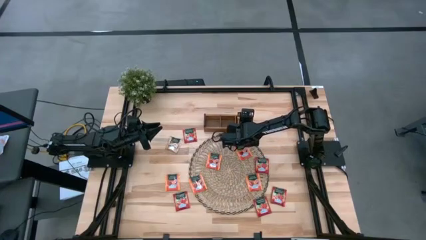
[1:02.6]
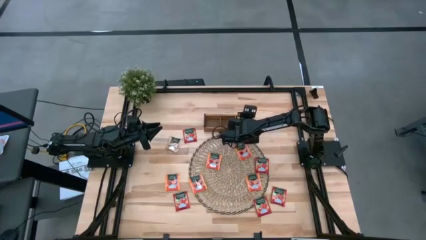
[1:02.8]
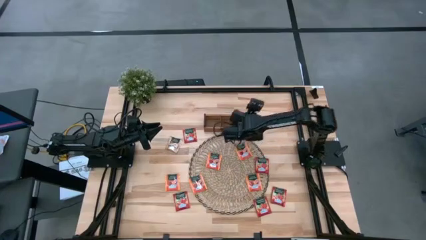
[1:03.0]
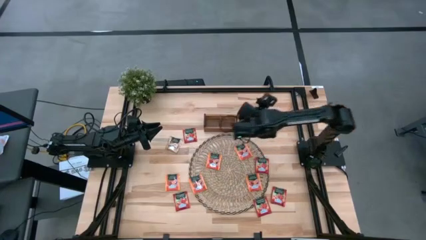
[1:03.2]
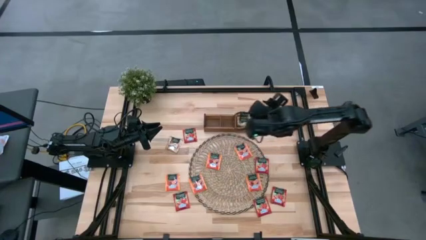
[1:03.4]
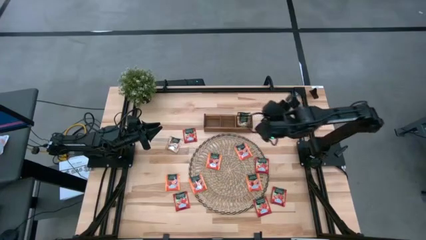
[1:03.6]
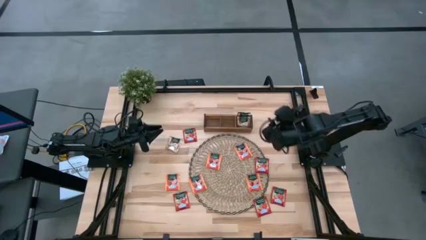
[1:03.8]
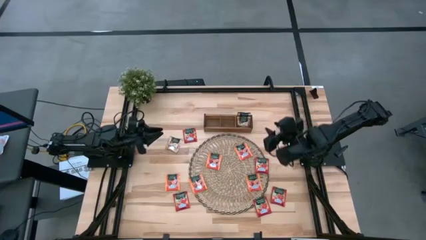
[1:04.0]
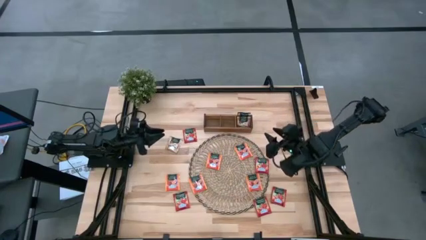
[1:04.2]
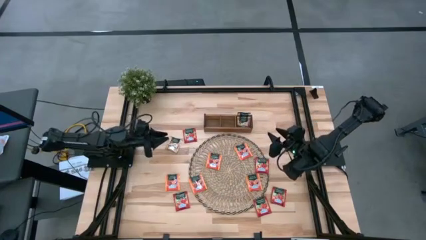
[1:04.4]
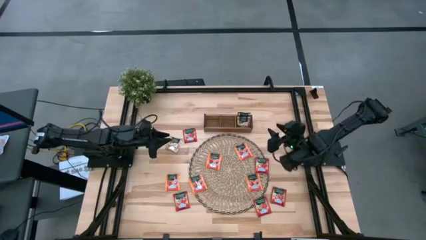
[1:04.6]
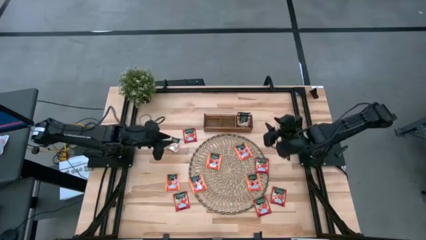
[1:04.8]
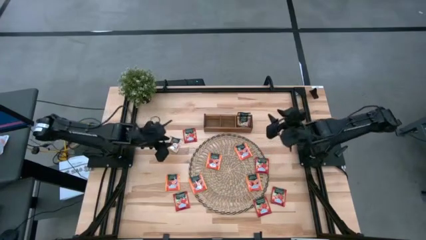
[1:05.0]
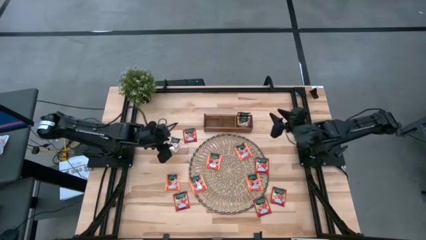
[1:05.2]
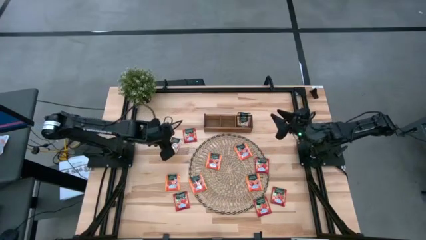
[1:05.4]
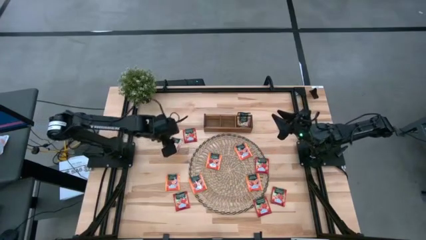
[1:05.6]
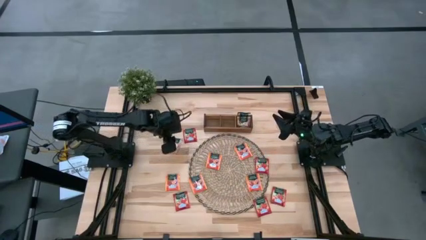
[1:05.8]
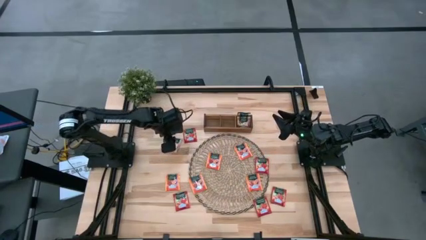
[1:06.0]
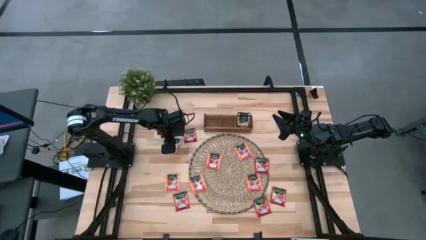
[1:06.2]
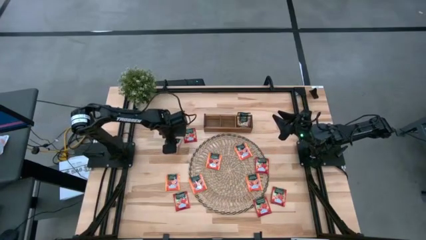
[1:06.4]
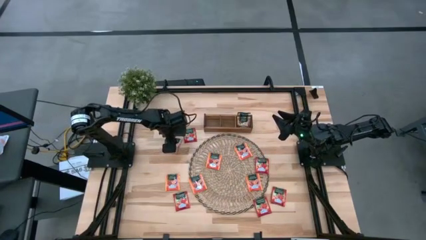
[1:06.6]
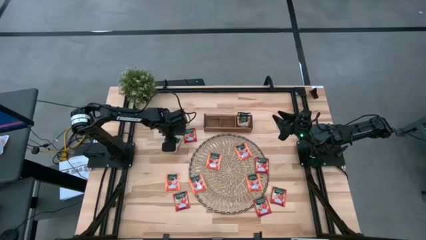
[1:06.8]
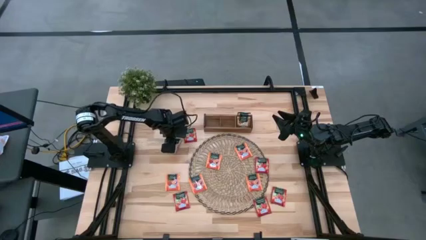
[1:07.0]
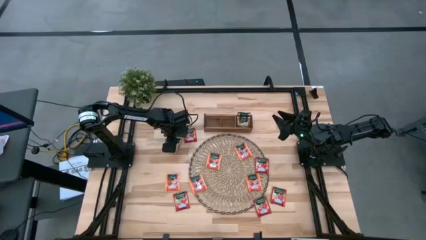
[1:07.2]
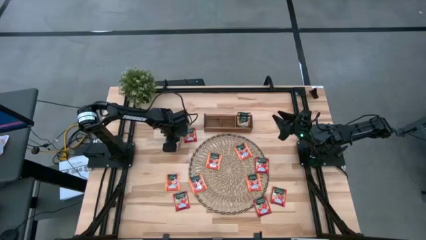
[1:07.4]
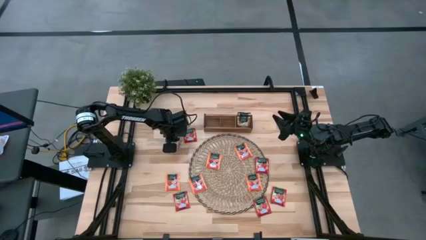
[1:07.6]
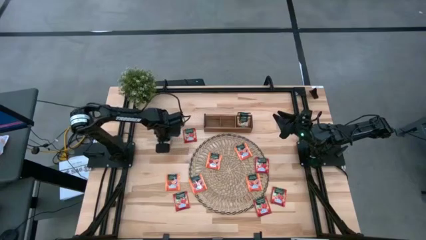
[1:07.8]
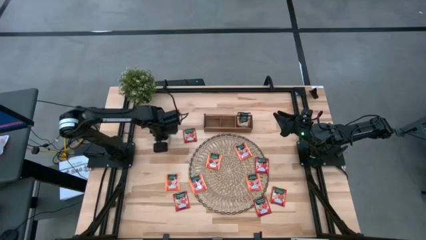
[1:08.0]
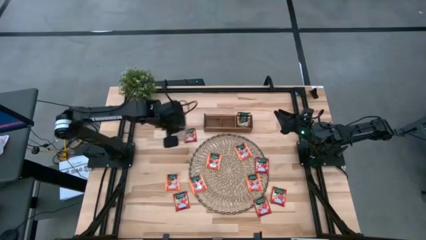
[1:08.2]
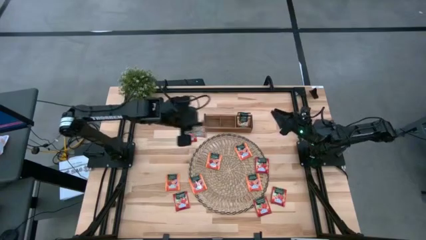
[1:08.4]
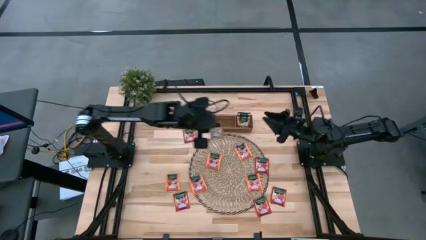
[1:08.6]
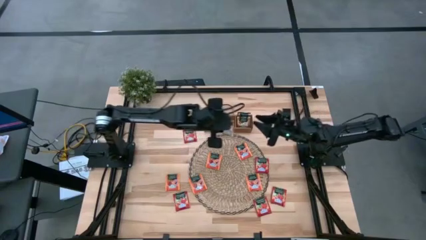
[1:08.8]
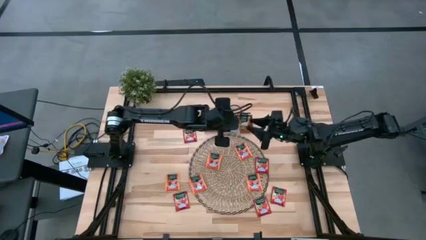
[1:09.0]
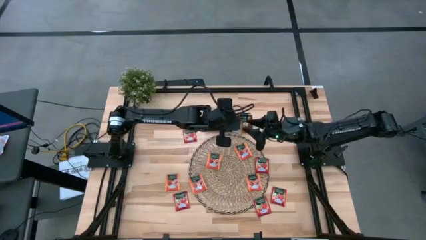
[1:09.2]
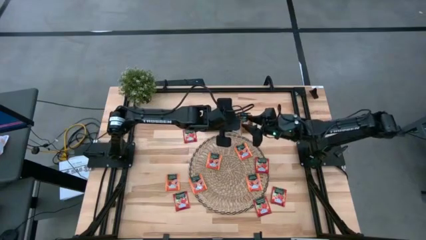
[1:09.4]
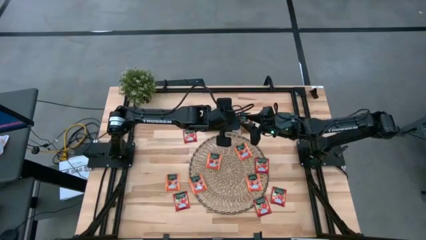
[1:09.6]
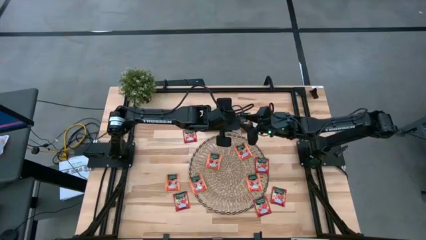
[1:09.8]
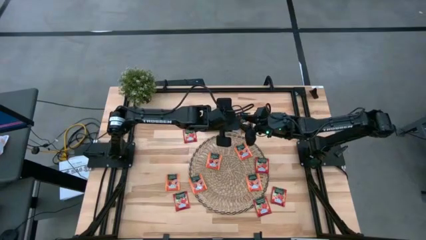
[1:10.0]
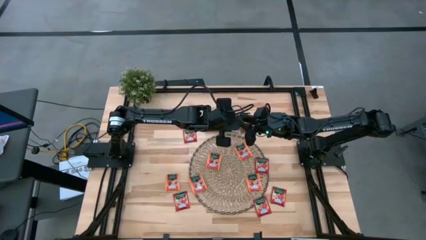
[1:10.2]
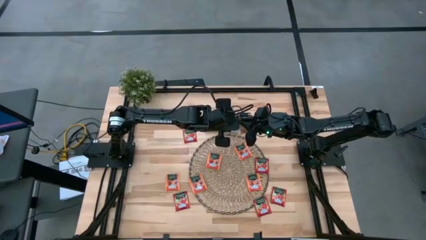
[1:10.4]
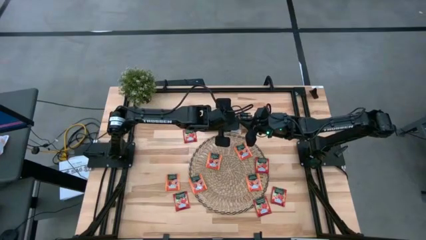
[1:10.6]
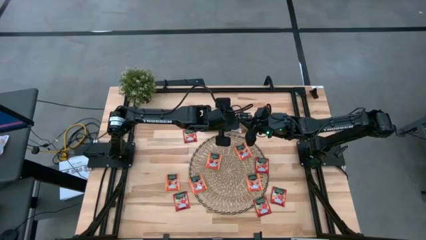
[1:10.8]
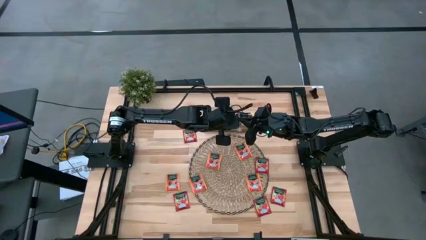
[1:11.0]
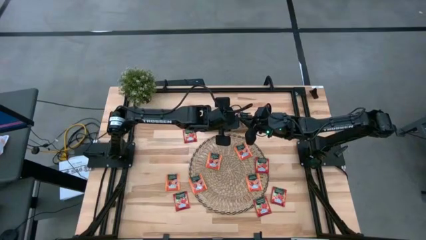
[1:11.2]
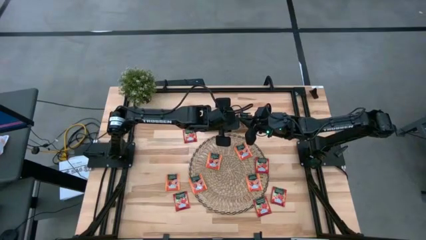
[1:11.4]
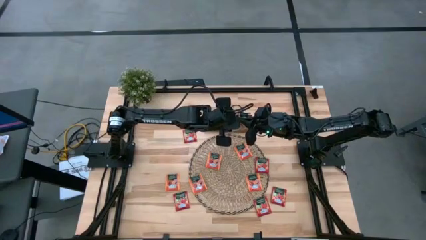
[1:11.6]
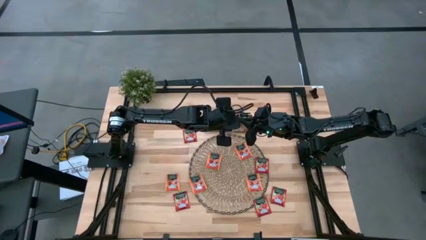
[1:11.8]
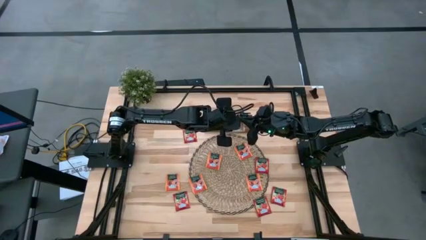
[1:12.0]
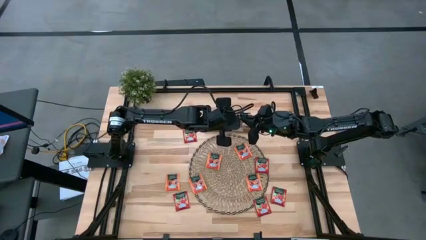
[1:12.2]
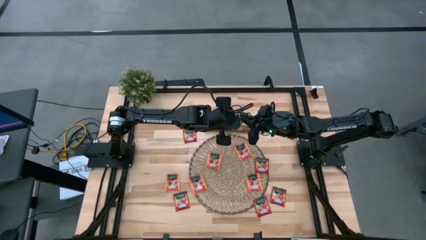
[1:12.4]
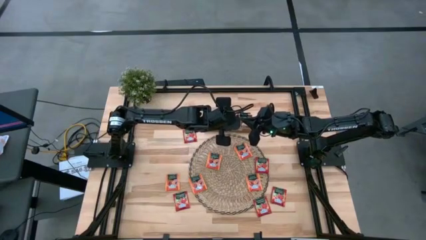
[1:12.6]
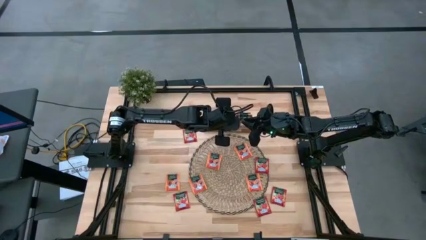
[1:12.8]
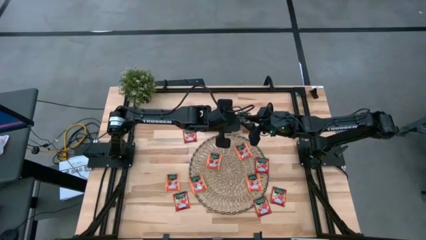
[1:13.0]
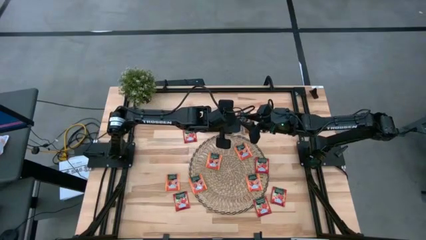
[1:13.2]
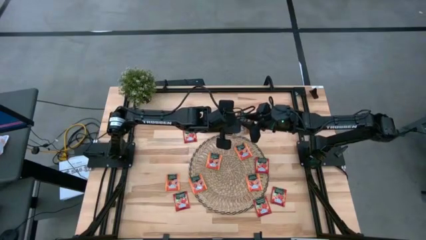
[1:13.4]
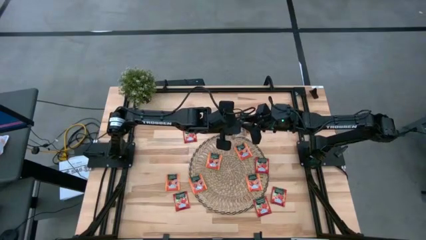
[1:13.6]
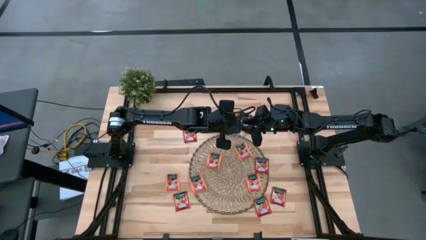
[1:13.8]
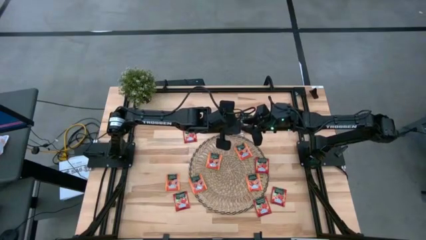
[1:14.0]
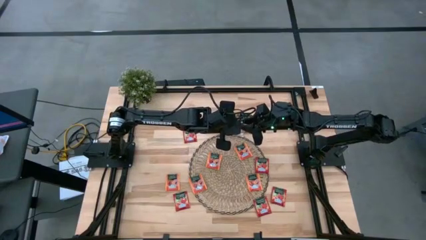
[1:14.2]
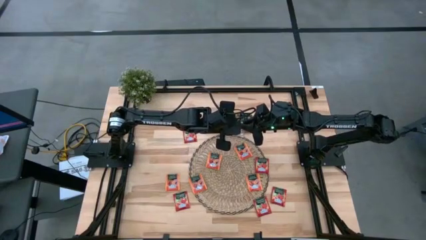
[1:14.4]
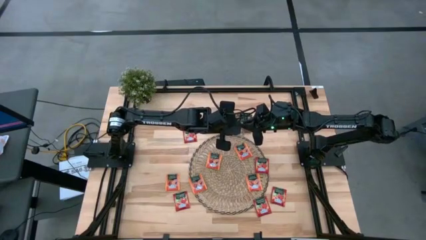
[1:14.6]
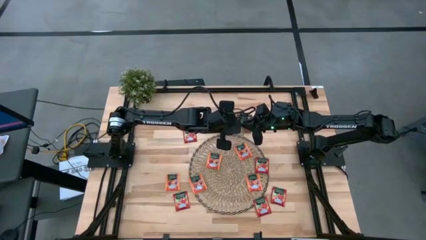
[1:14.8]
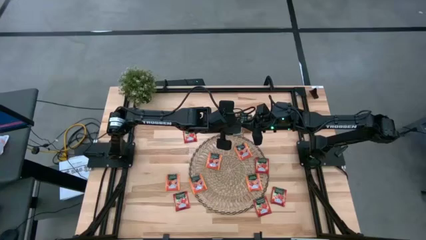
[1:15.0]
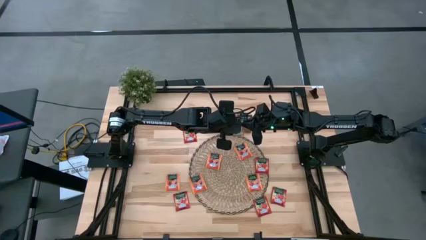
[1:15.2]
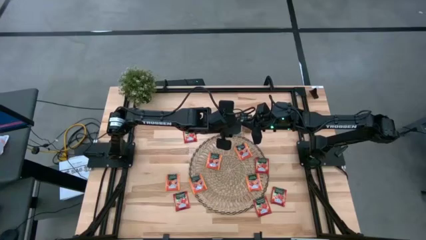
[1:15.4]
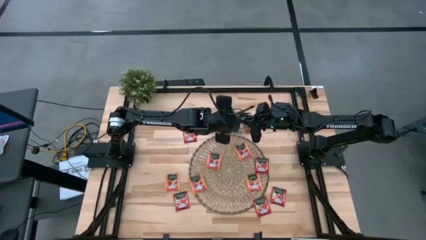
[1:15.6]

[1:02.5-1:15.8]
Task: Pick & Place Tea
Put the brown tea bag into the right section of the wooden organizer
